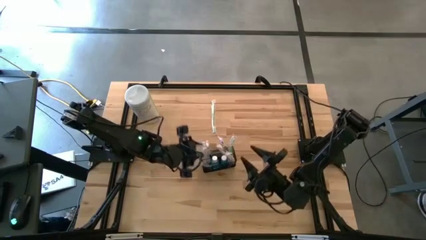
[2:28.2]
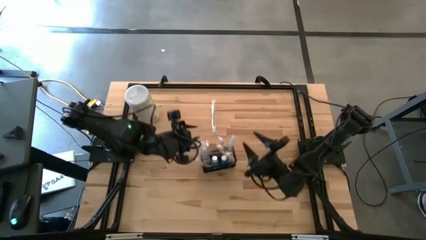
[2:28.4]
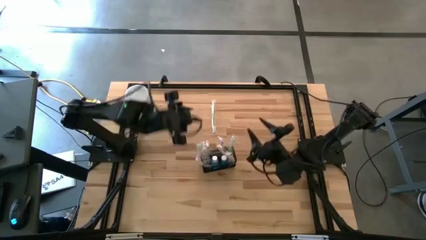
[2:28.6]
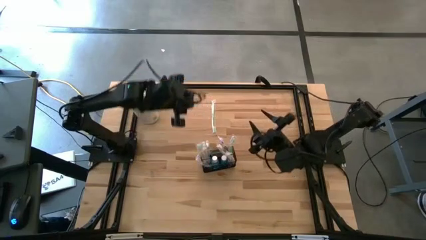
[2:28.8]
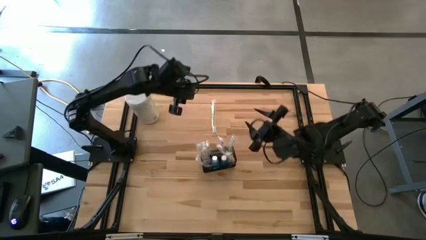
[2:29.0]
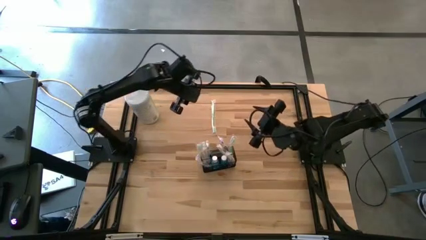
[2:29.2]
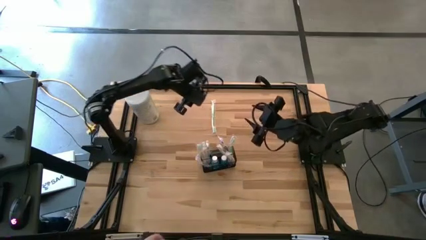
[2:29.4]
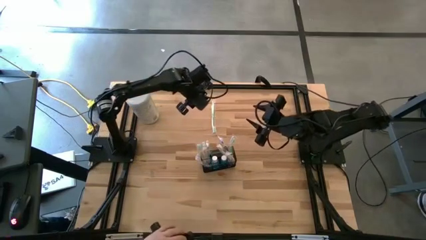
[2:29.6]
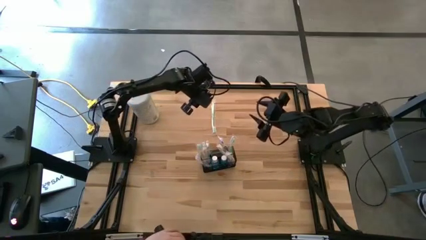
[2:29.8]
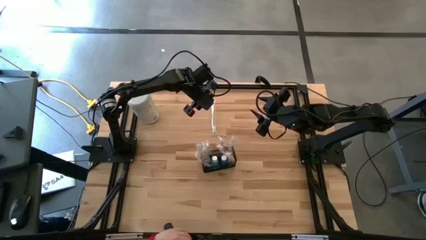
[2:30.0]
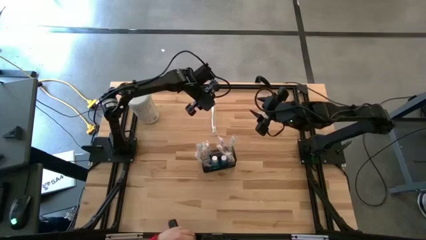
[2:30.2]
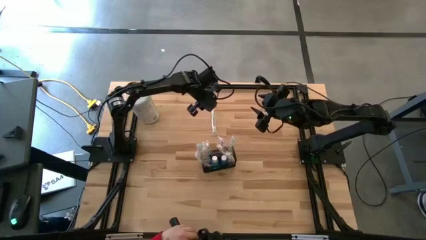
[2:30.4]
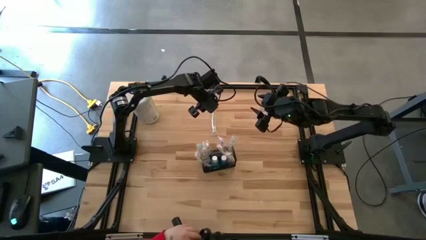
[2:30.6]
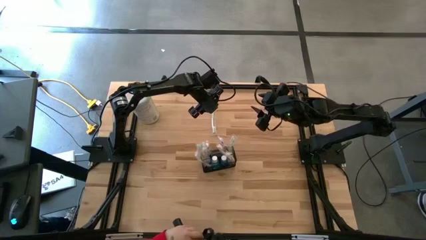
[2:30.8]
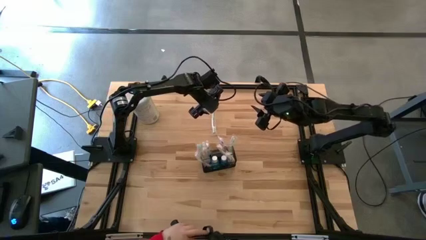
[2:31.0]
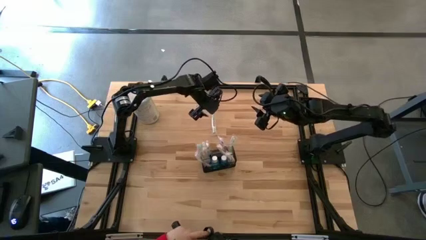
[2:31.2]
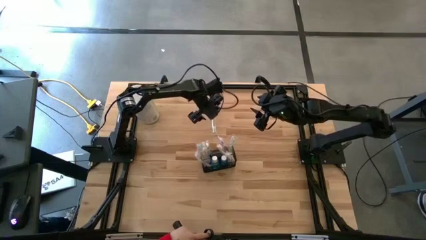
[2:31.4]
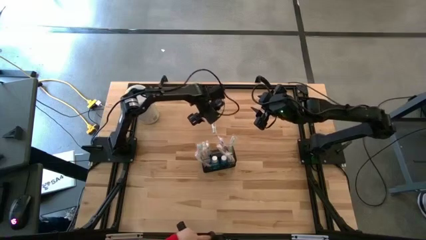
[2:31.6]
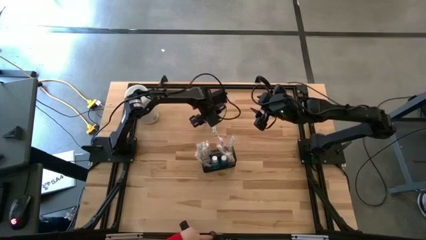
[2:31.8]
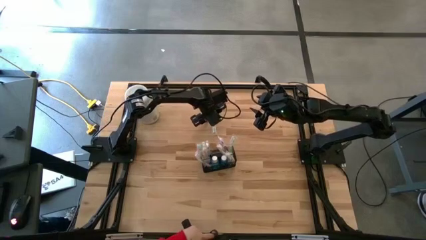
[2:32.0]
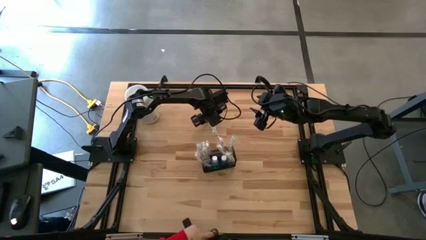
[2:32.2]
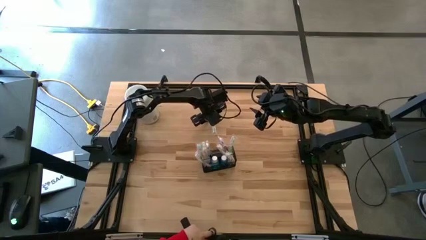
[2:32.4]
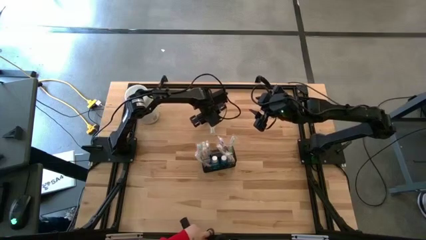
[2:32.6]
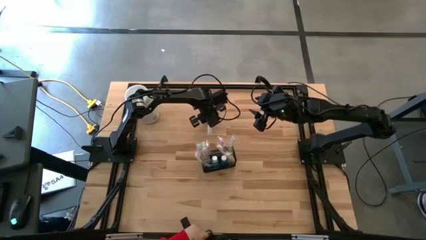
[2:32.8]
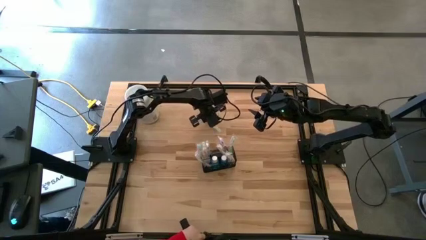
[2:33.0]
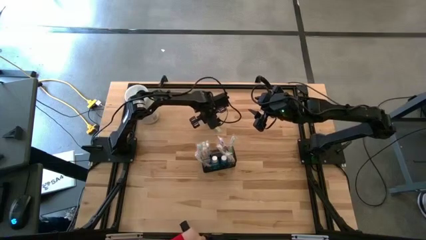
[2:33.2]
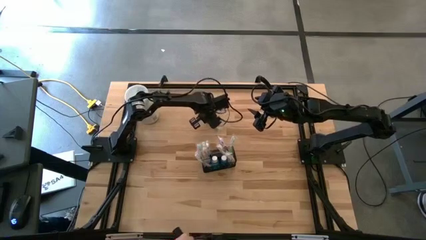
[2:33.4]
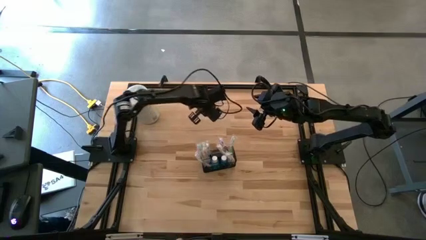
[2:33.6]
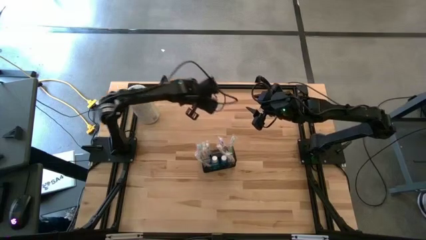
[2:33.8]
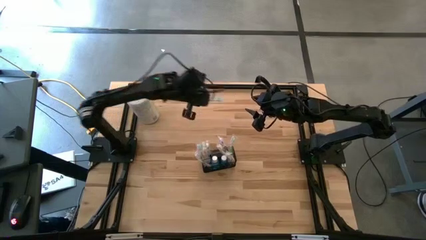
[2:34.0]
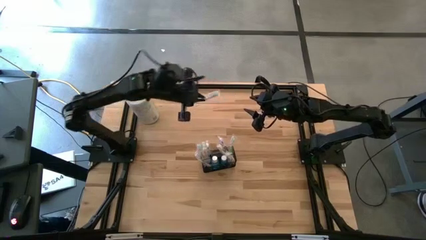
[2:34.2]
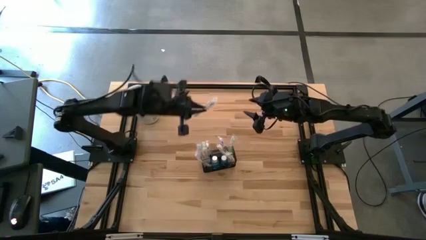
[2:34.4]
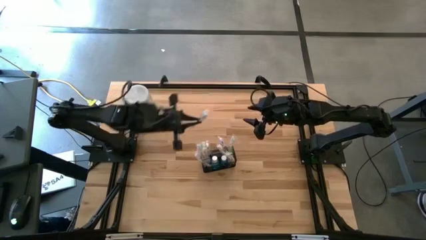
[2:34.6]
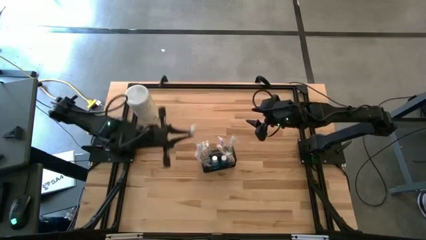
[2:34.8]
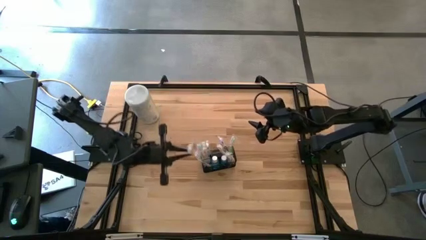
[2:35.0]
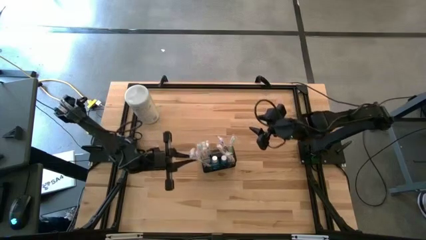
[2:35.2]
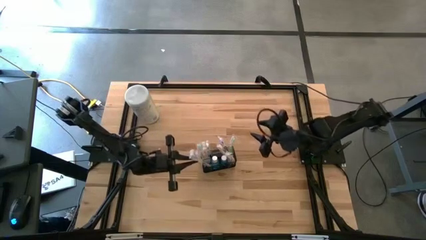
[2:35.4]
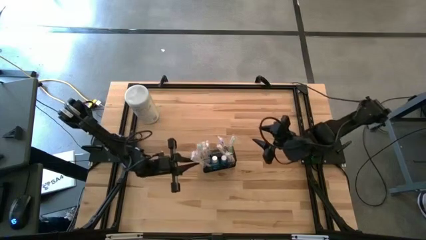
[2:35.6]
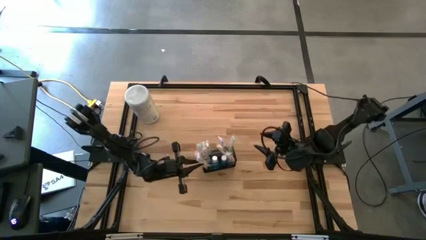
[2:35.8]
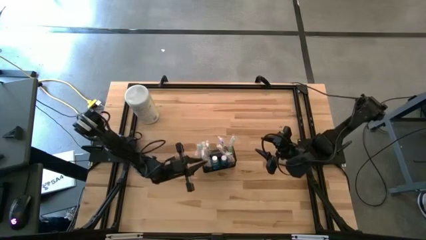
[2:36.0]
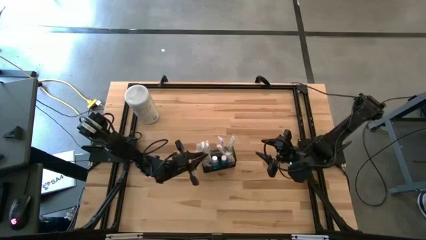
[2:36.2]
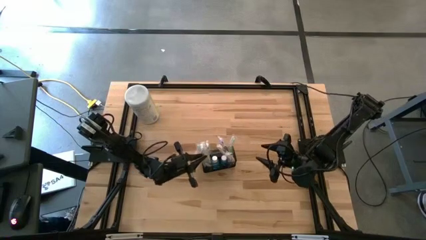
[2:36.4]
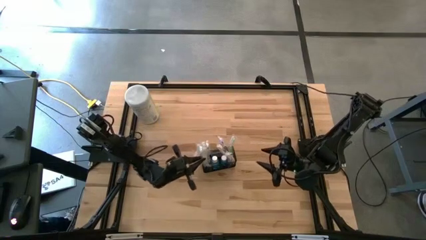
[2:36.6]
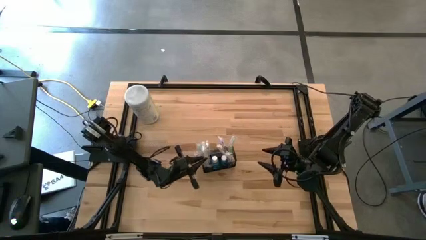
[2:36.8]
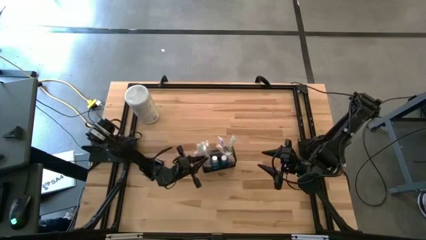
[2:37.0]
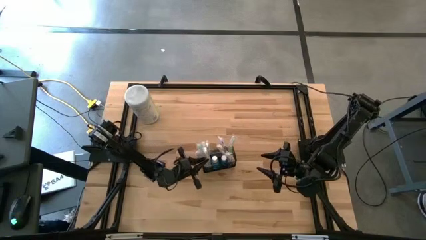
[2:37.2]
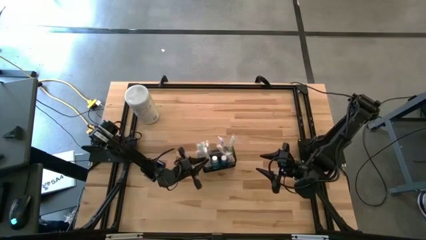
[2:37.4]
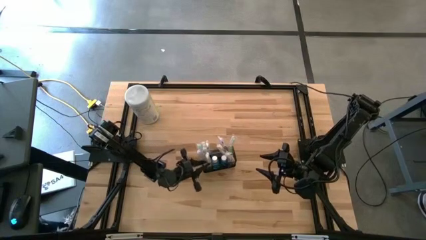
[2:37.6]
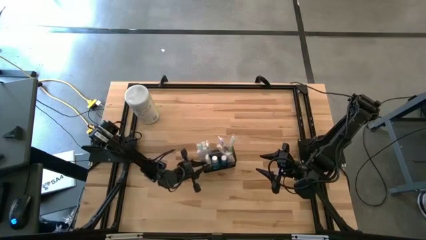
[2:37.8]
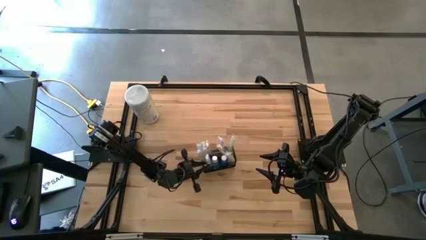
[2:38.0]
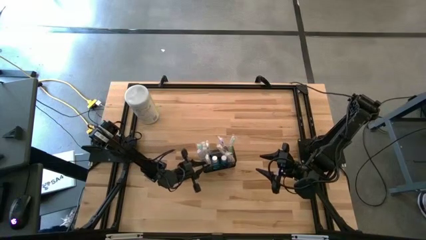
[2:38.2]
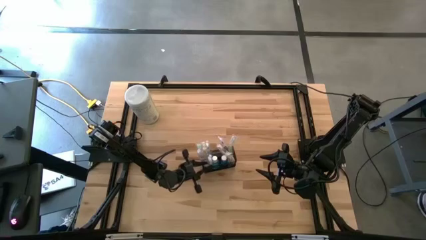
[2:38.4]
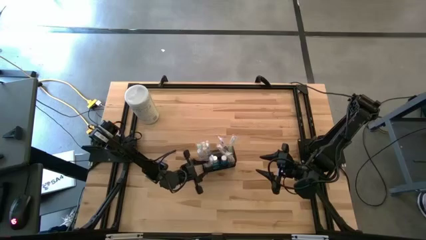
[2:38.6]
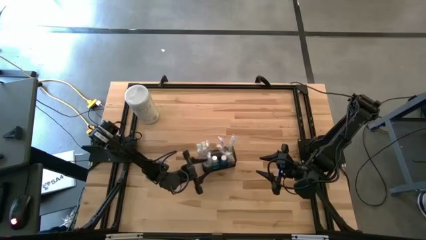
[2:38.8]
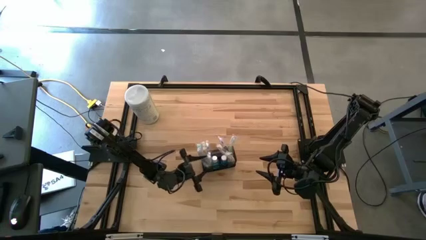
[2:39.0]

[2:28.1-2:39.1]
Task: Pick & Place toothbrushing station
Put the green toothbrush into the black wire organizer

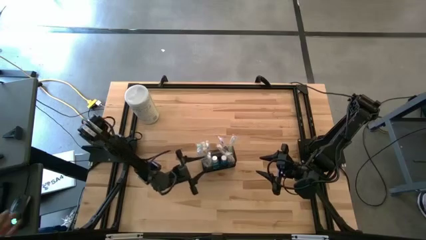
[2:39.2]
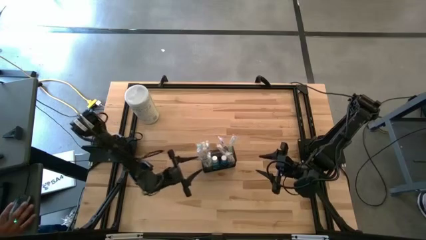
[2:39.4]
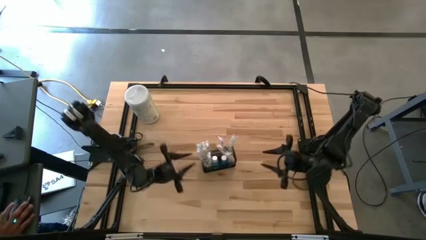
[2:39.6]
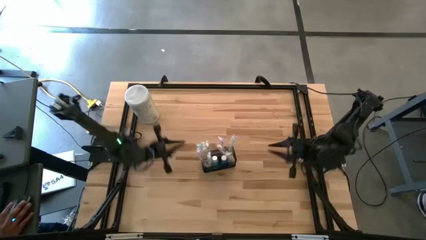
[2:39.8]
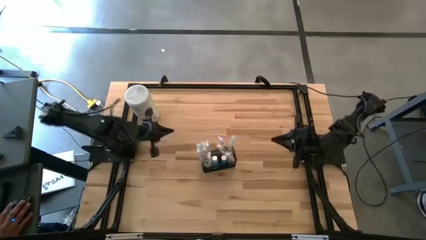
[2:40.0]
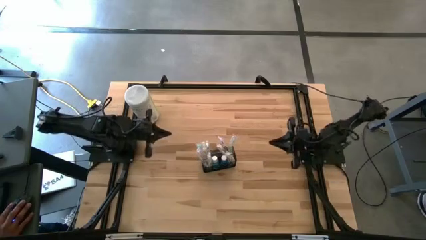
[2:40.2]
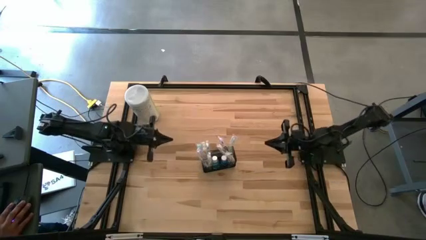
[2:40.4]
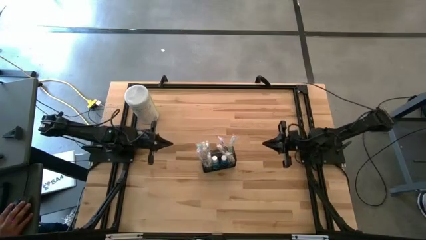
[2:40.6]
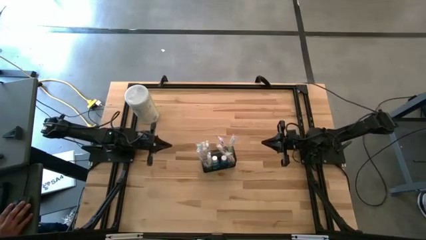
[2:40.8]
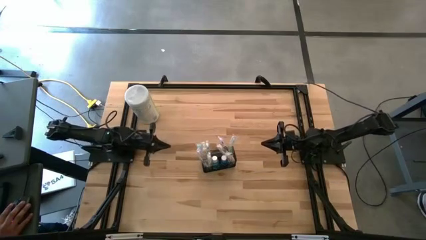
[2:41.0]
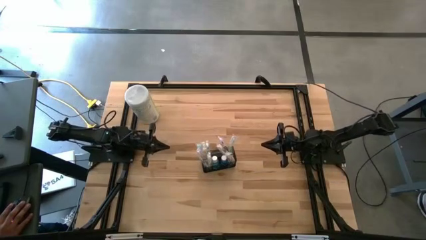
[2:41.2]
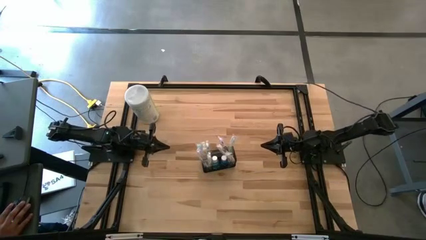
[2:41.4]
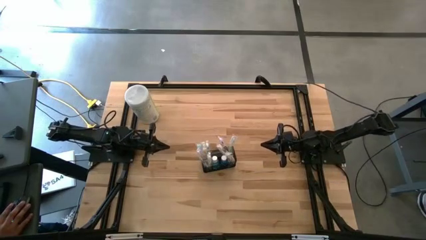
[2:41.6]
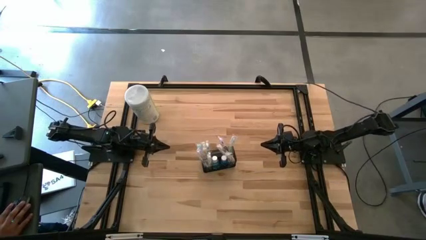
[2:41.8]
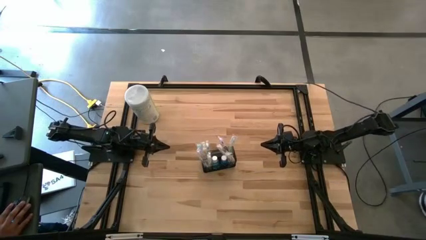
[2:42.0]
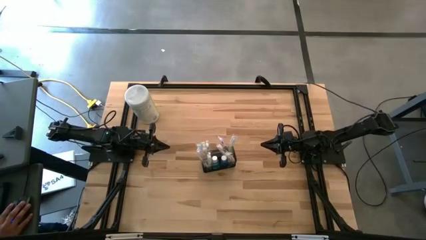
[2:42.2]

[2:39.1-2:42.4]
Return to Home Position
